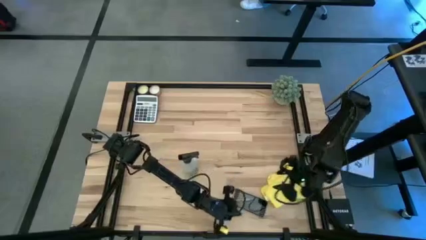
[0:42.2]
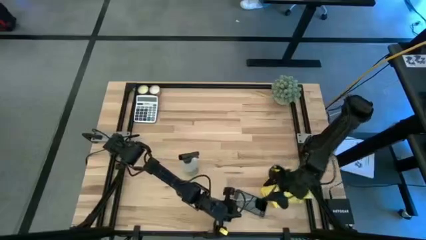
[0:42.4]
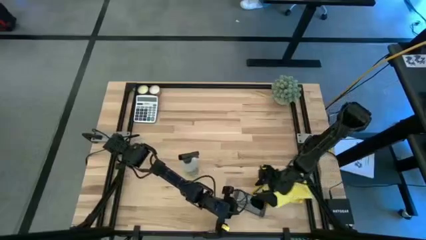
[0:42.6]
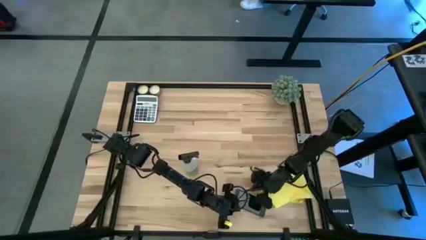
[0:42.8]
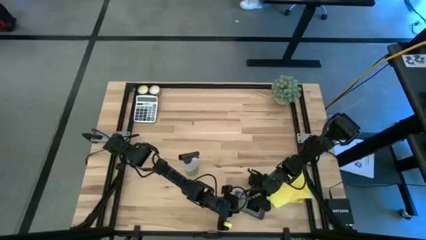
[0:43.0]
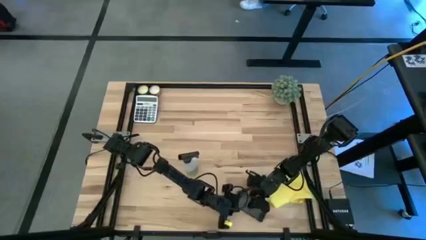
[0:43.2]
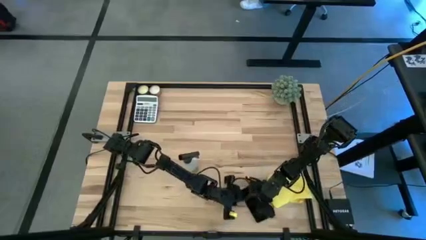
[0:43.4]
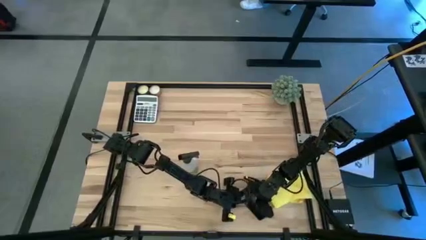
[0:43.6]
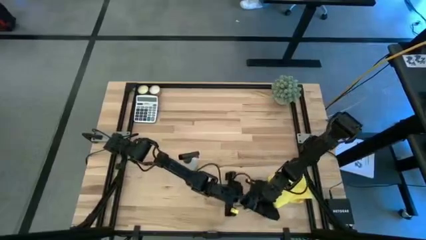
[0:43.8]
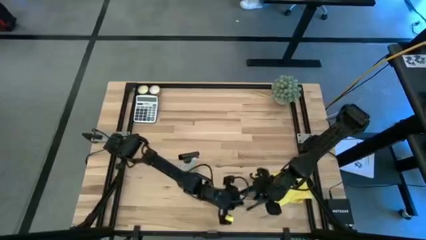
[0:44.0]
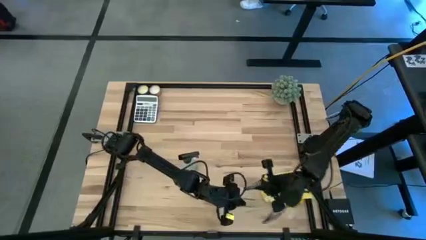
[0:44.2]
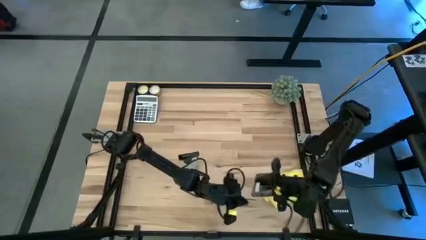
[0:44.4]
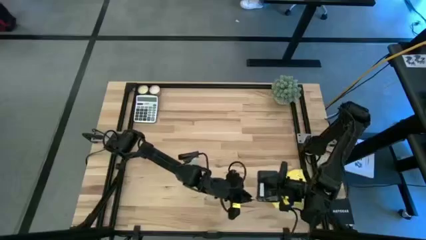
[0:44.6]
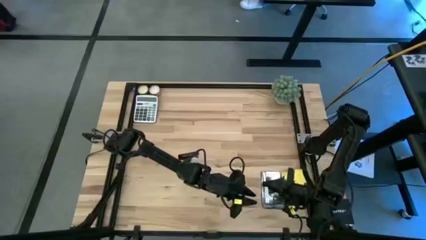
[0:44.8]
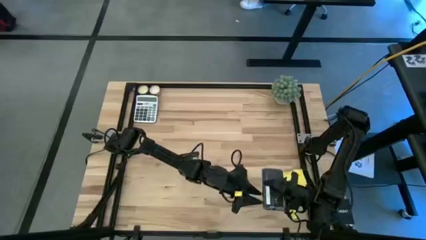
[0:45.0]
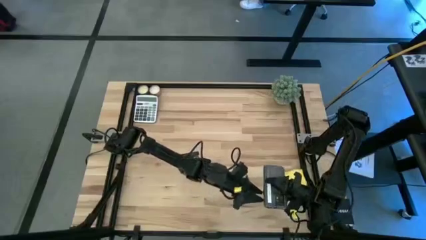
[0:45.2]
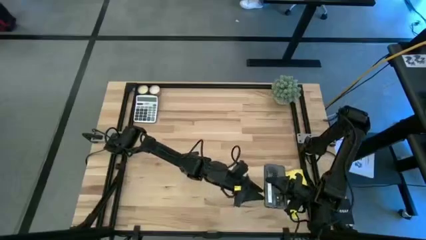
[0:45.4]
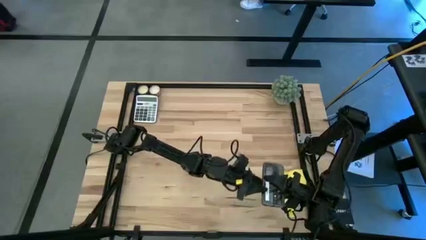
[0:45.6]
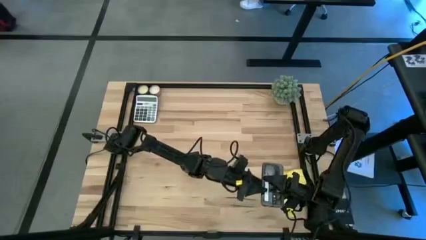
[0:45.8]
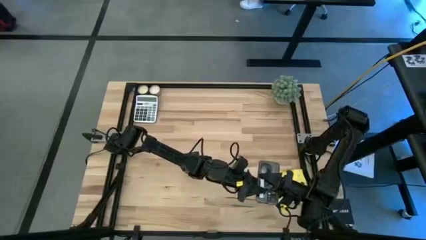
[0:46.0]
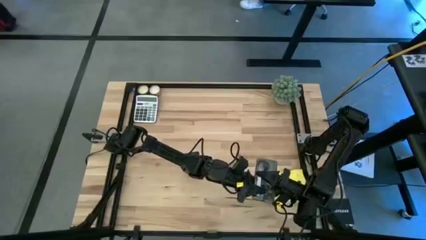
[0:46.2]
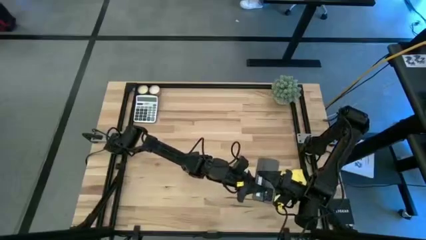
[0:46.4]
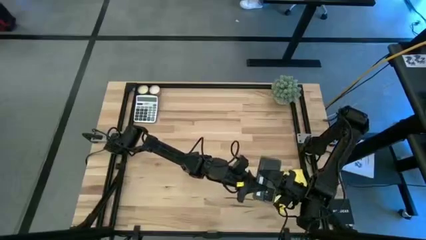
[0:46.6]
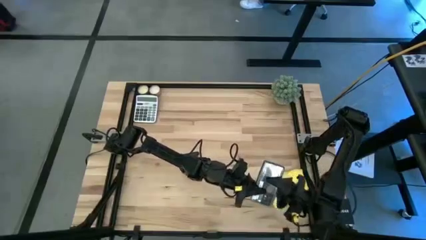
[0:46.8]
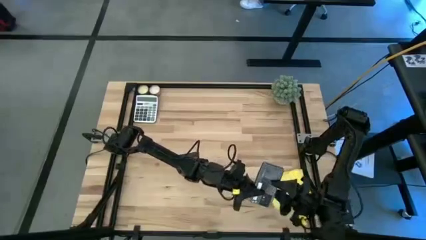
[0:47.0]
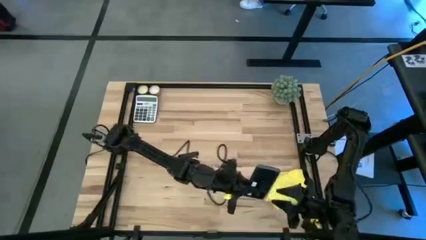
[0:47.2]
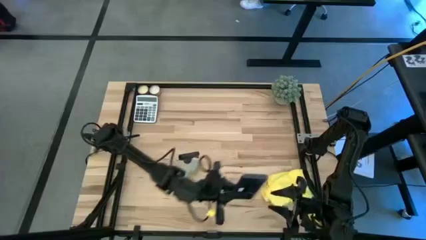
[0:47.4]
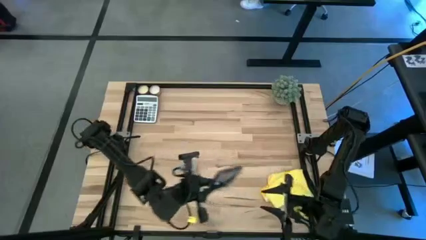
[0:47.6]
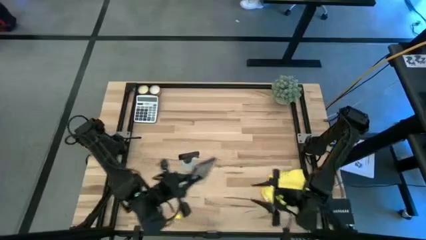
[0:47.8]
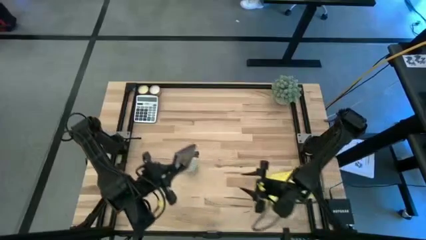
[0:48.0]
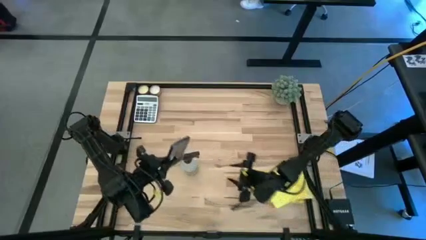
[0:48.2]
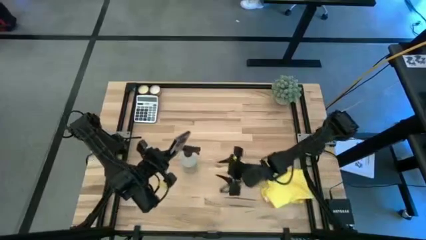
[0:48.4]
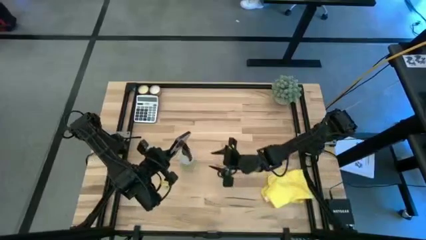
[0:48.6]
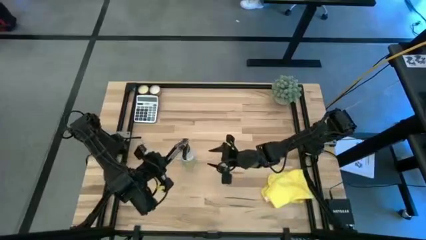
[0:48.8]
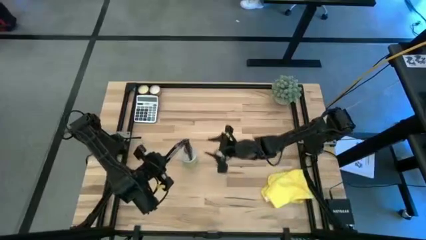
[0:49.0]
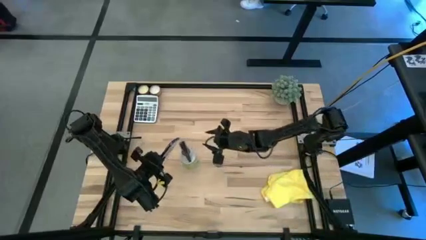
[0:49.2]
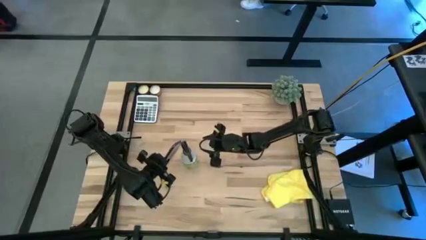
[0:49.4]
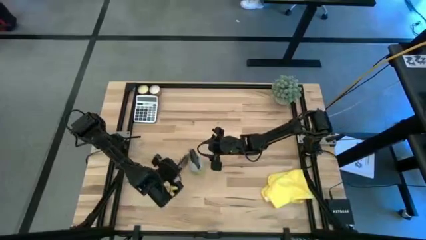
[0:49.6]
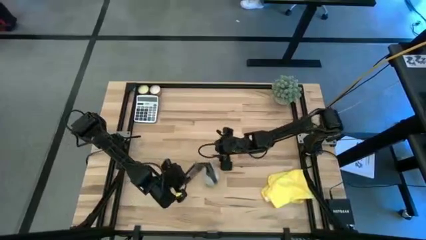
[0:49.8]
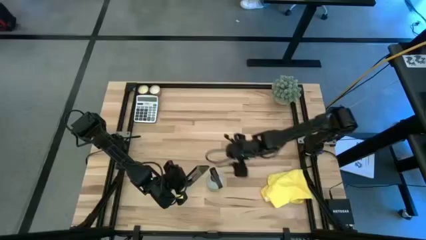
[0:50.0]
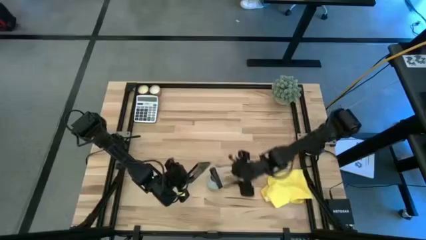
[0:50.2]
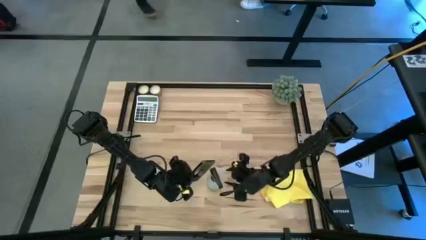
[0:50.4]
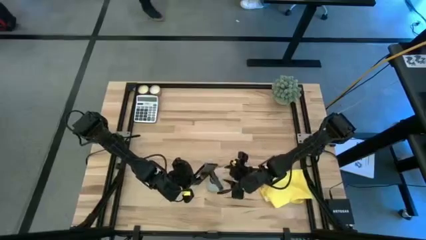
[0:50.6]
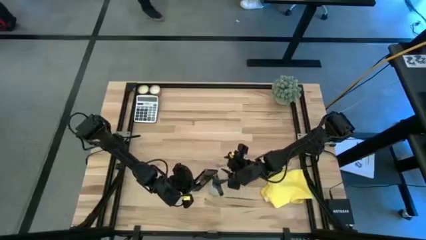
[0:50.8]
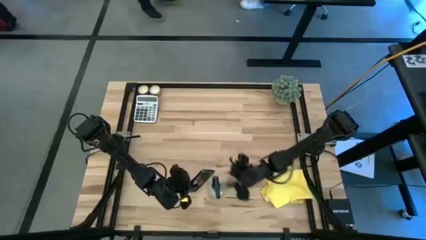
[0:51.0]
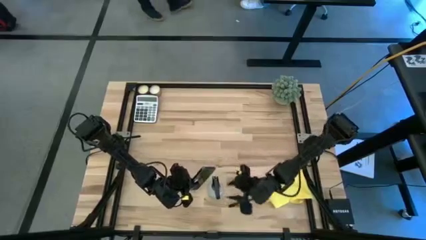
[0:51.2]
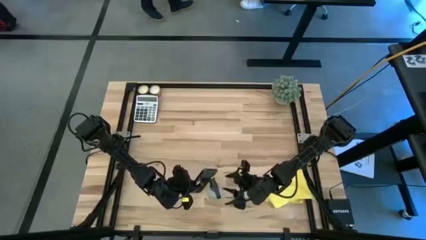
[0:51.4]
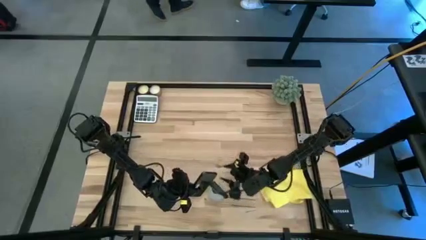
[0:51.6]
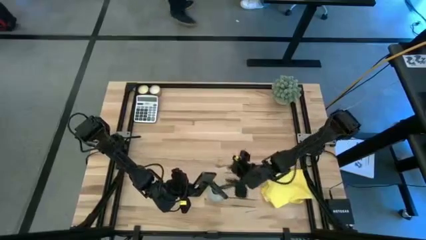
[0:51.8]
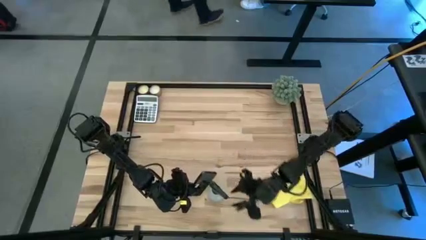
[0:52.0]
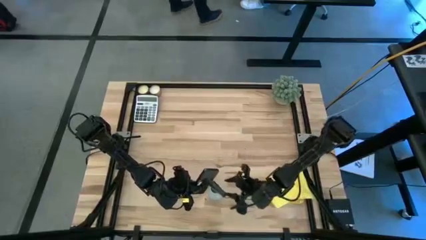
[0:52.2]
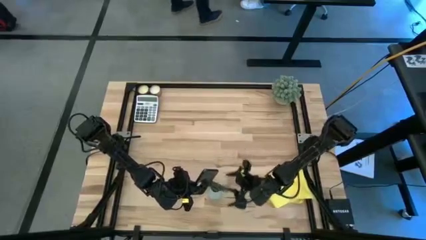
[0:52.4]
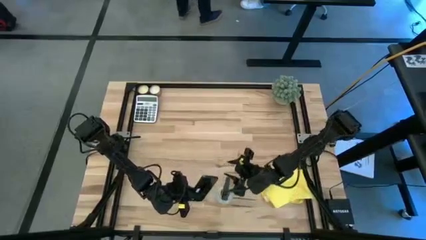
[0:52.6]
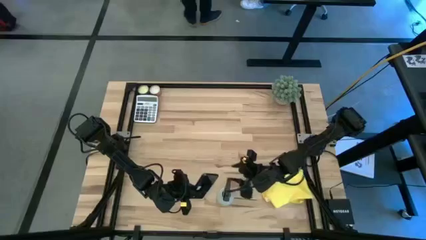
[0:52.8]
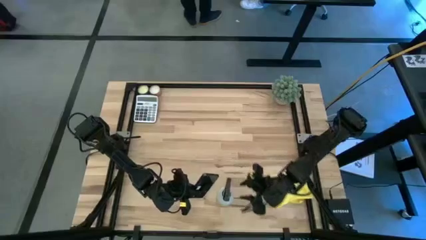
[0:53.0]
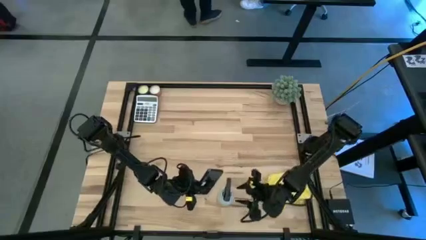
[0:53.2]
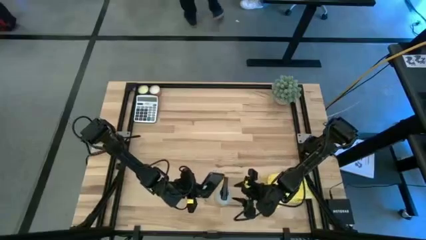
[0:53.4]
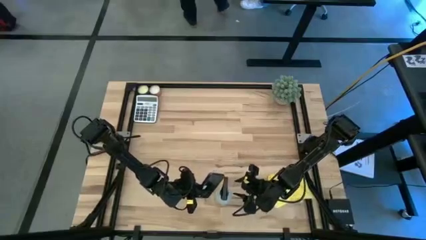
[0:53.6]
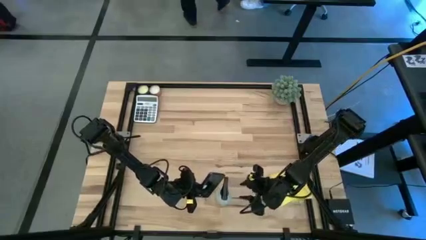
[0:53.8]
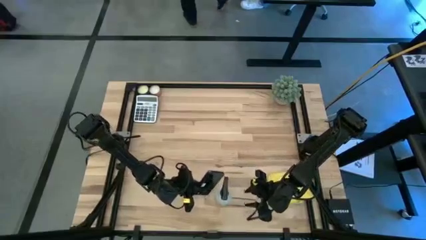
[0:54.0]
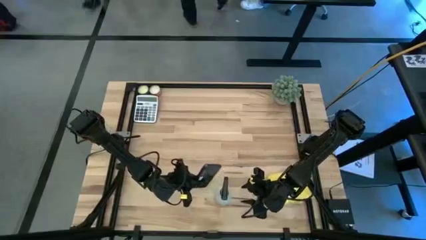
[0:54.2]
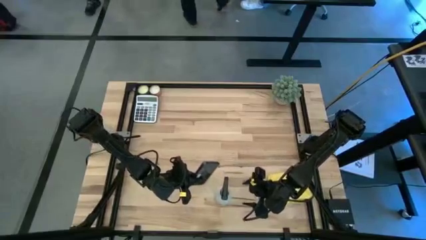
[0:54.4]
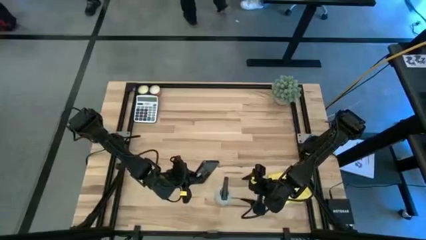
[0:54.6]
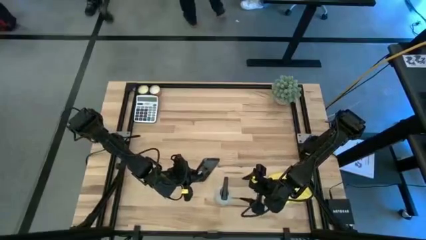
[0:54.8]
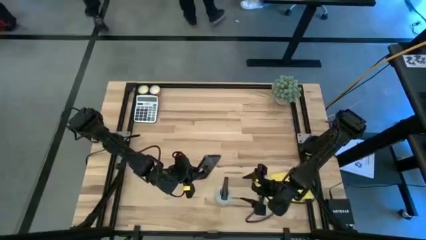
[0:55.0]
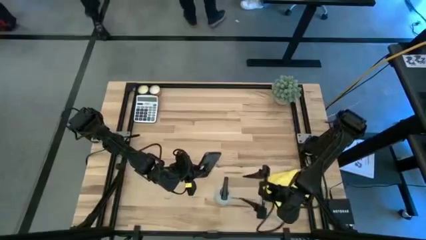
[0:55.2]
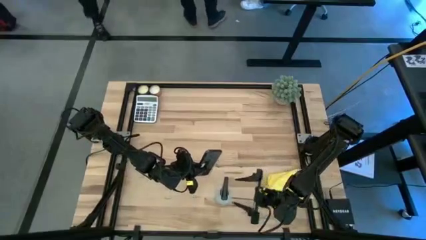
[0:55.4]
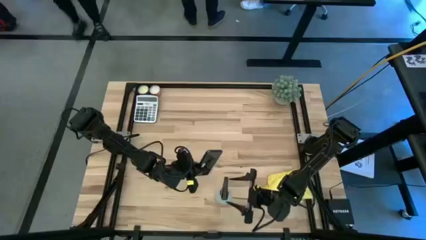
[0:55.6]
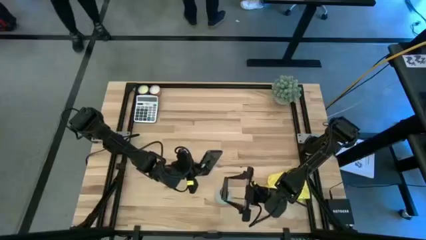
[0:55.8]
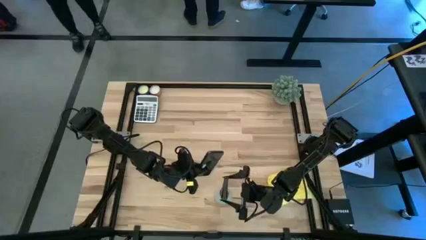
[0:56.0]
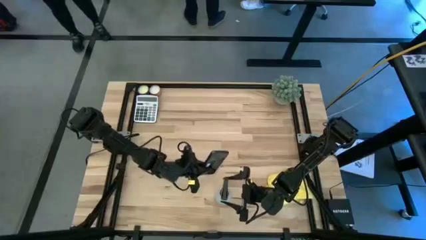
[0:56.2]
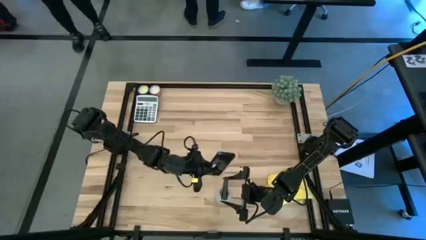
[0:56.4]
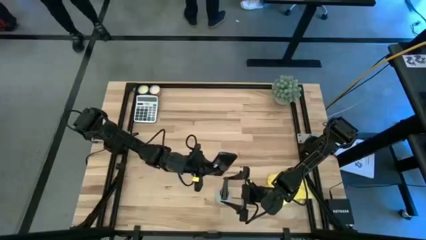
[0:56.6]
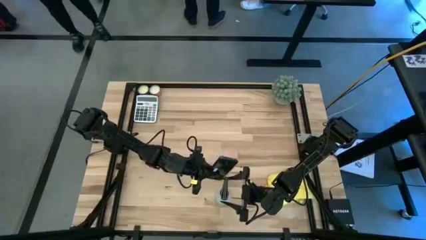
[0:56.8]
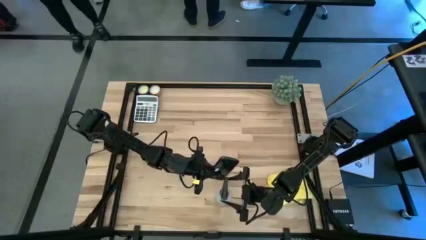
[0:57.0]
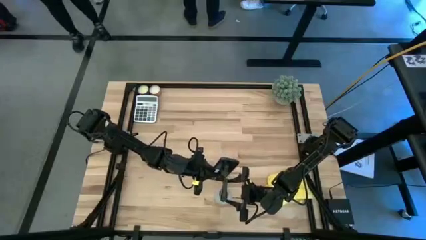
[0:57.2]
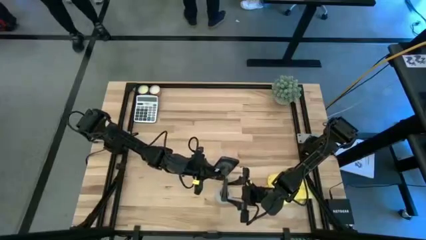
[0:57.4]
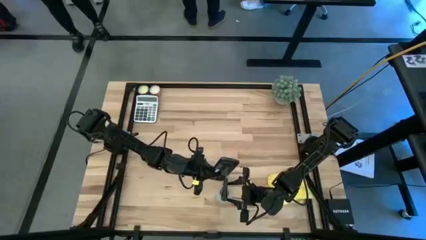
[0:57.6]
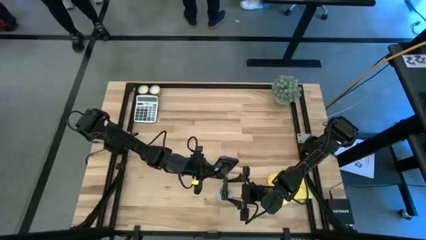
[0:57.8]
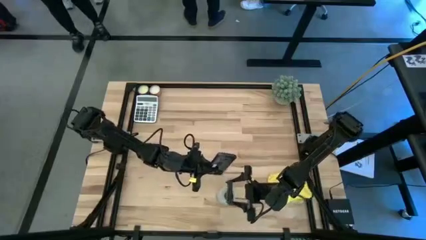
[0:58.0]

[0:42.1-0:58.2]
Task: Apply microfiber cloth
Spray the back screen of the black cellphone using the spray bottle

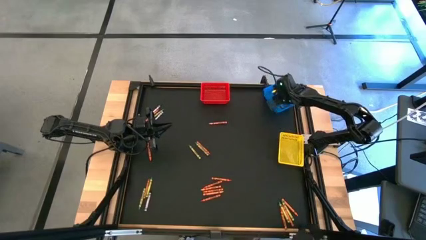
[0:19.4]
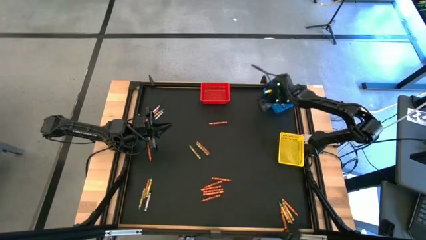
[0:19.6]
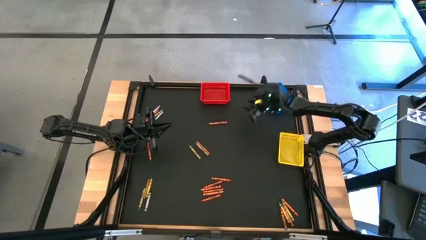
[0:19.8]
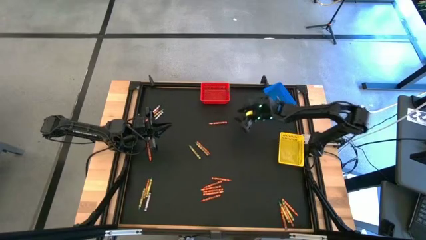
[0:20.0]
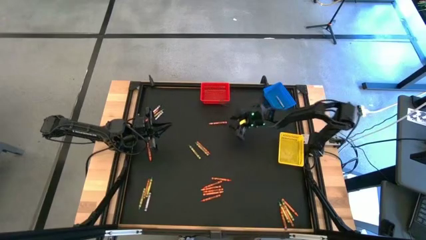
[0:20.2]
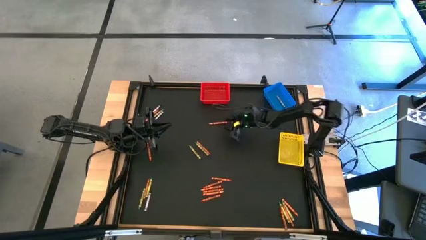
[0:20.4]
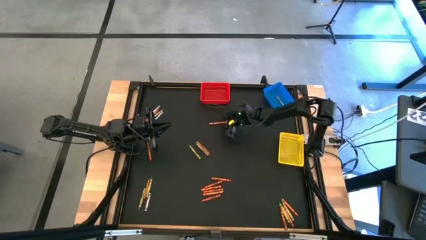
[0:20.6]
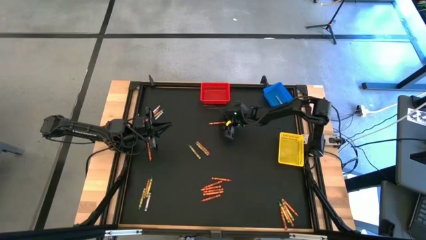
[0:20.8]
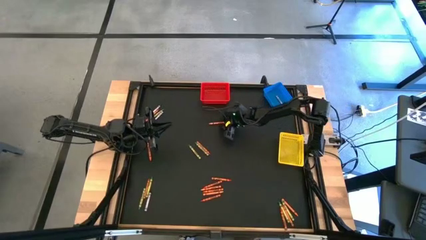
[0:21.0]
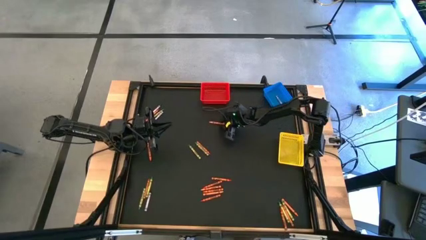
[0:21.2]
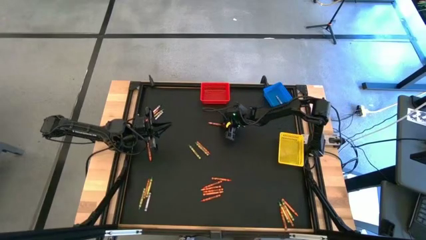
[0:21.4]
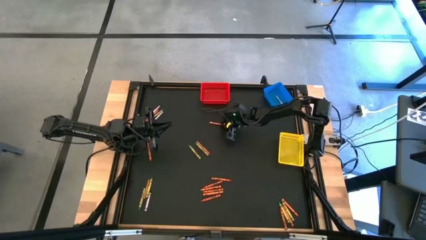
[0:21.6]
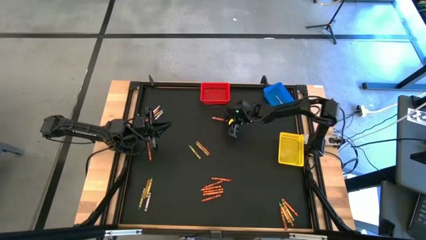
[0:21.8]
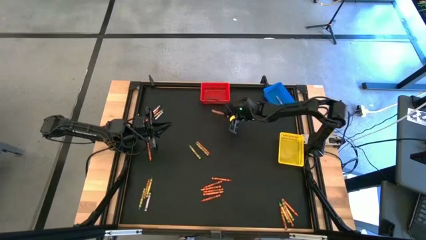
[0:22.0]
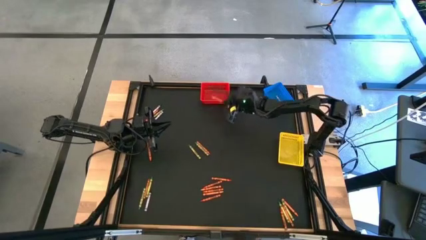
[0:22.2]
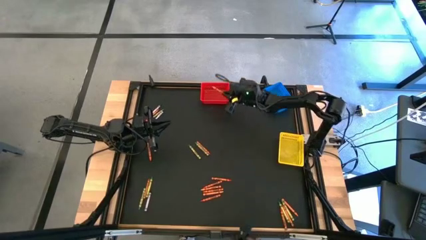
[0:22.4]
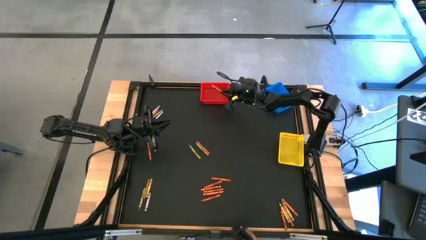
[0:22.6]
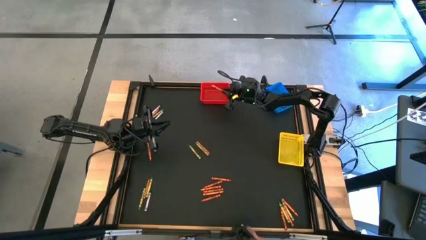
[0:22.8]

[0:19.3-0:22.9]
Task: Sort crayons
Put the orange crayon into the red bin
